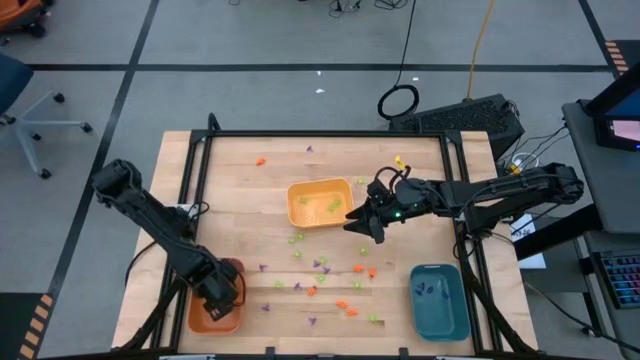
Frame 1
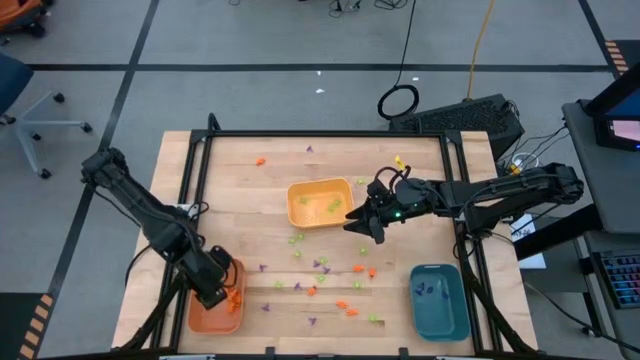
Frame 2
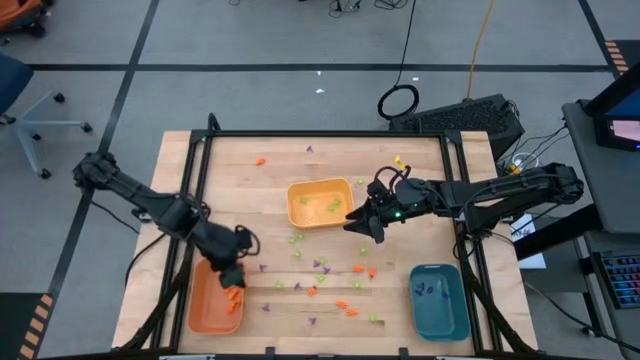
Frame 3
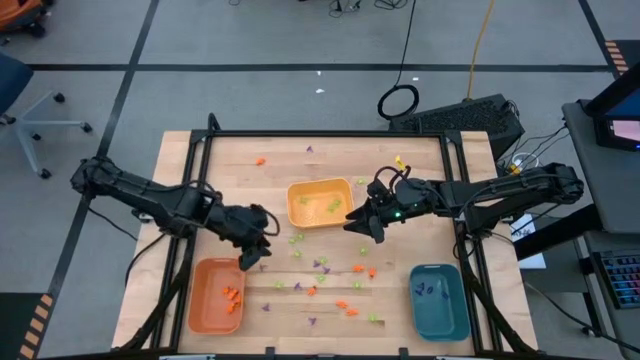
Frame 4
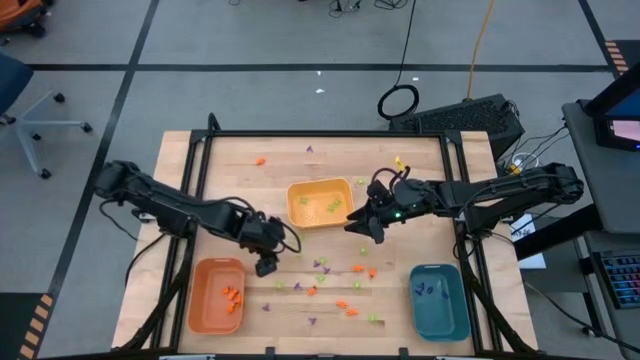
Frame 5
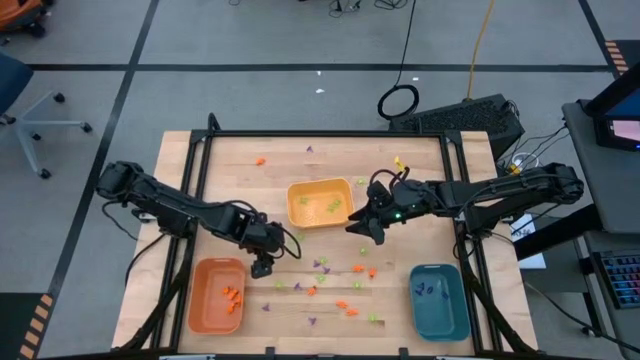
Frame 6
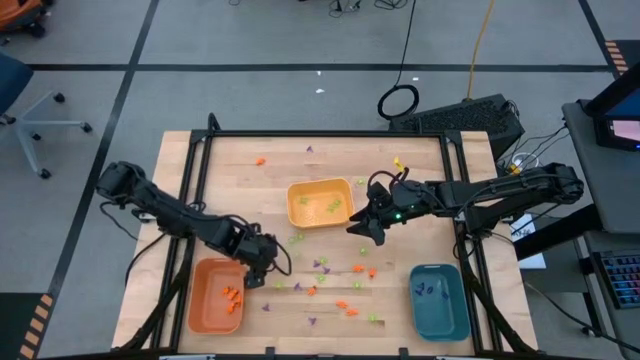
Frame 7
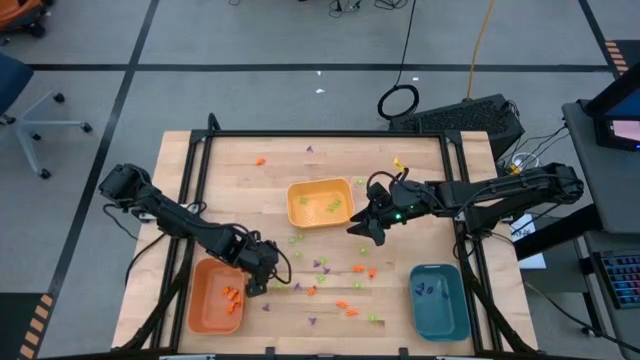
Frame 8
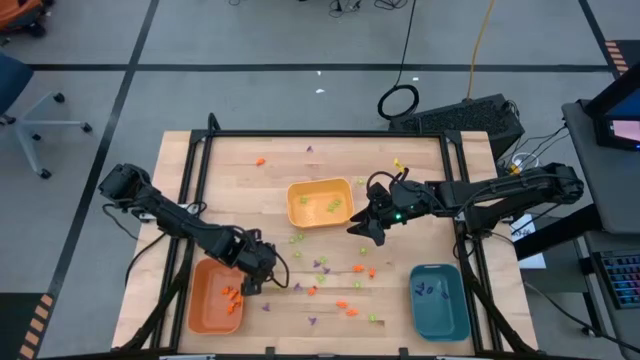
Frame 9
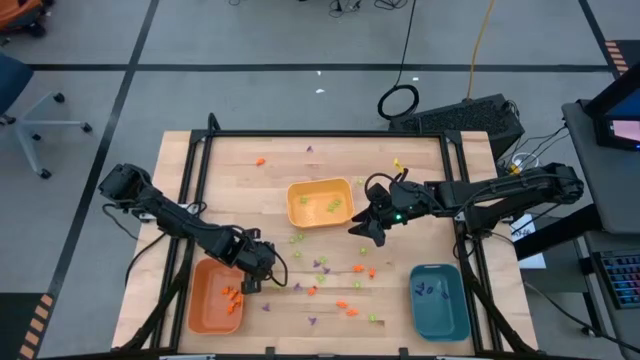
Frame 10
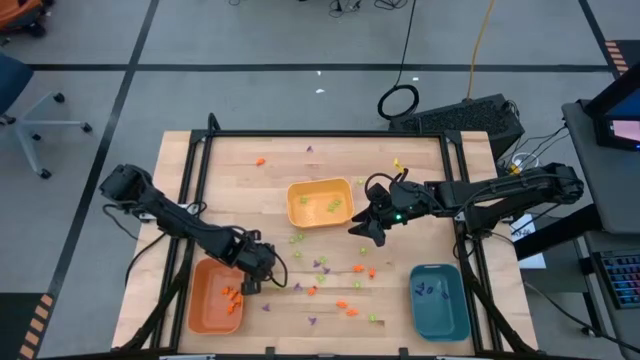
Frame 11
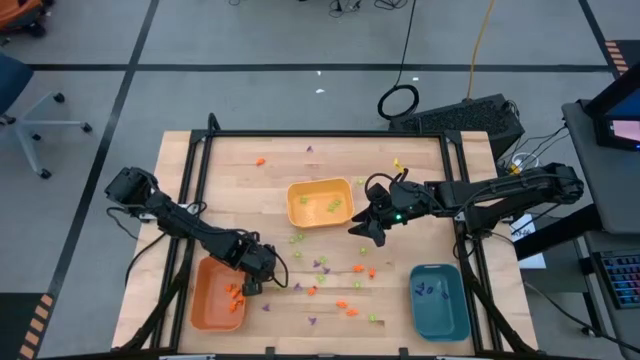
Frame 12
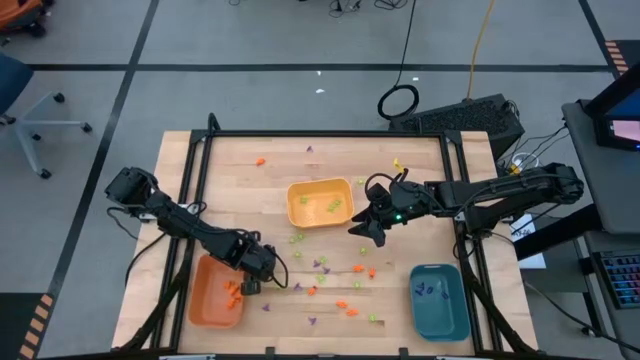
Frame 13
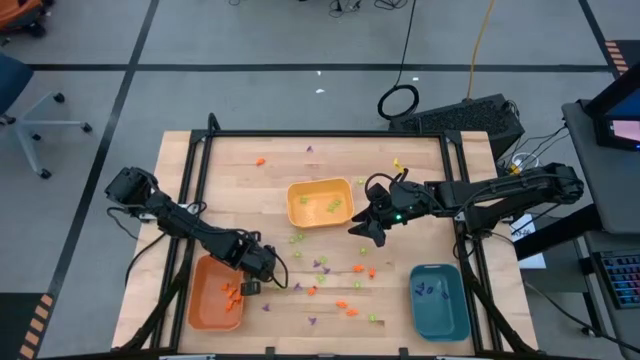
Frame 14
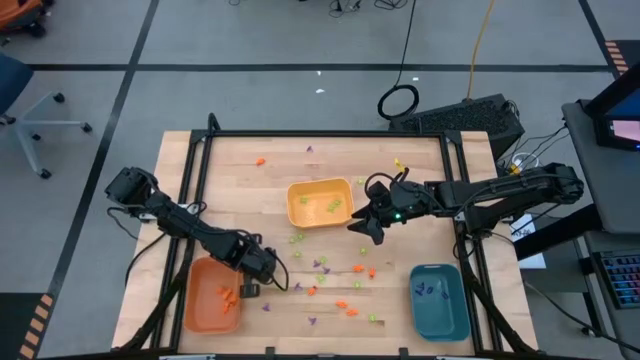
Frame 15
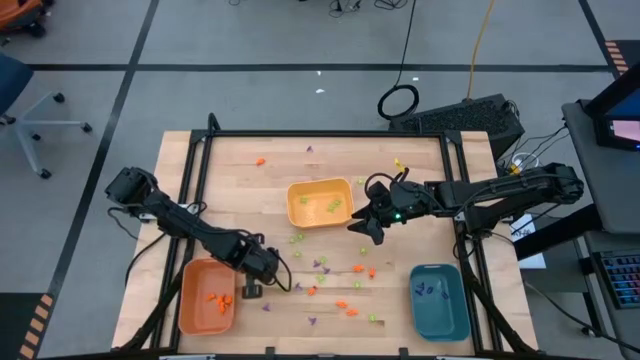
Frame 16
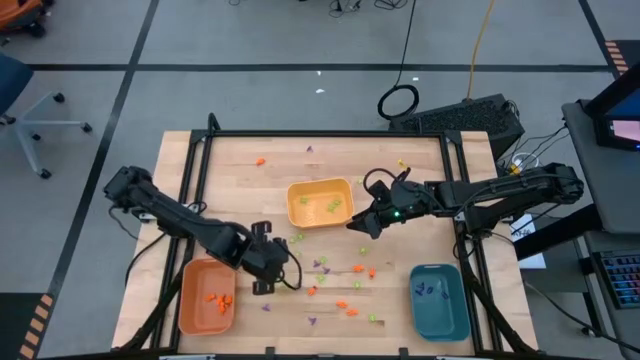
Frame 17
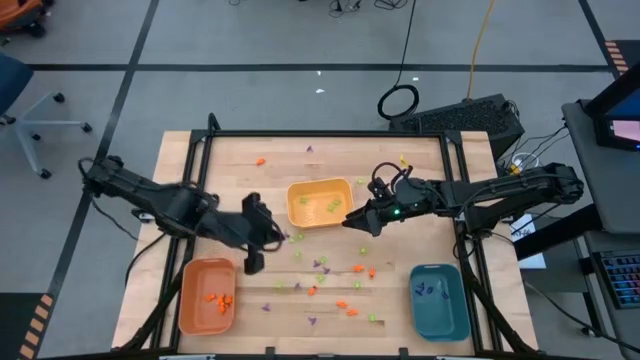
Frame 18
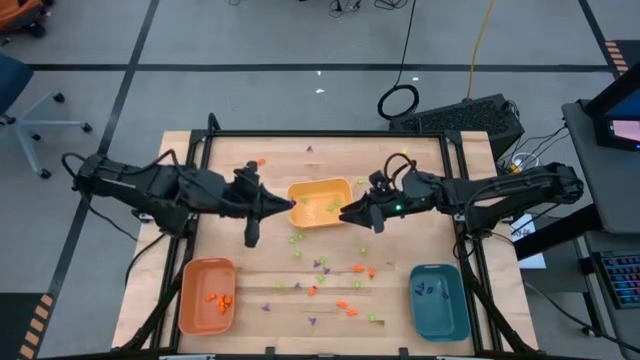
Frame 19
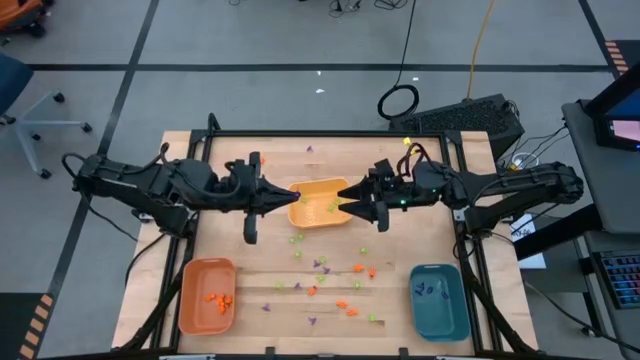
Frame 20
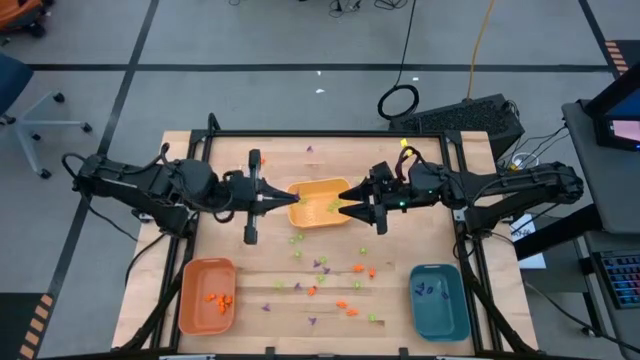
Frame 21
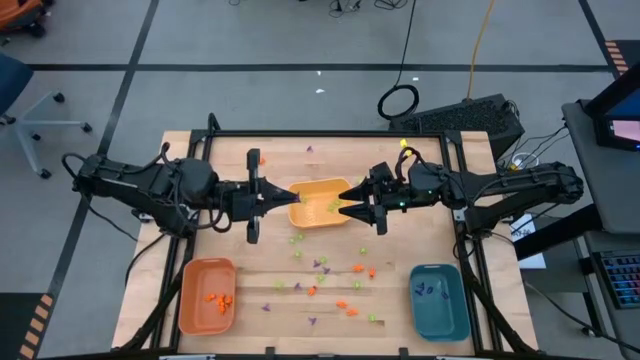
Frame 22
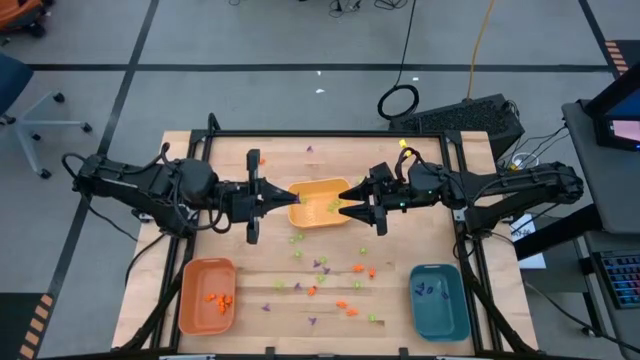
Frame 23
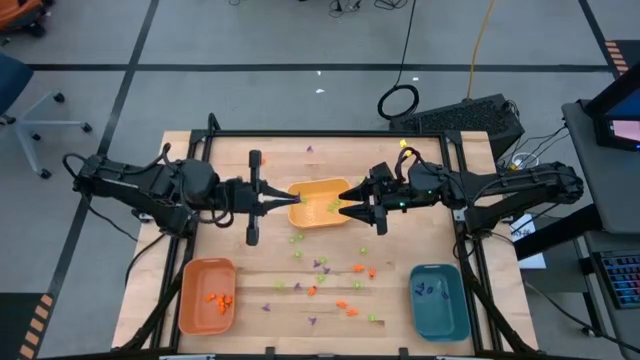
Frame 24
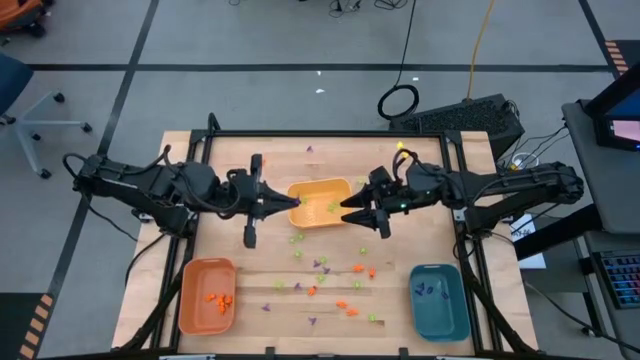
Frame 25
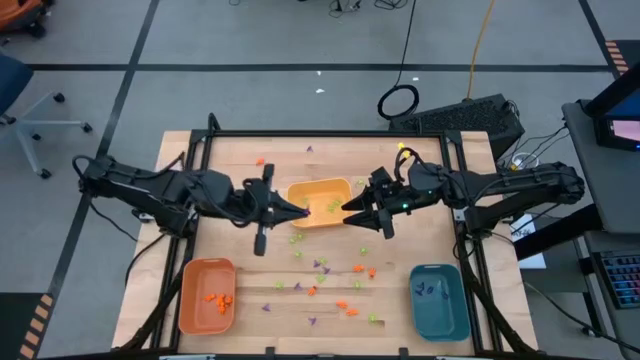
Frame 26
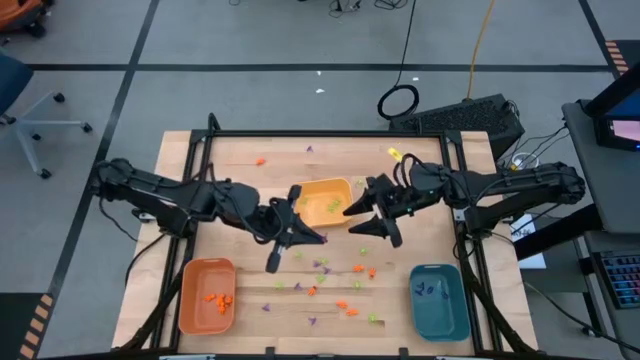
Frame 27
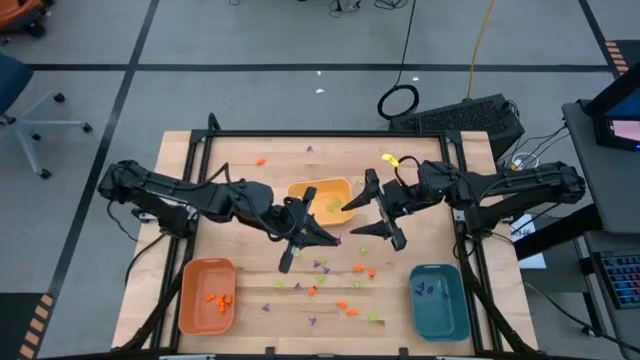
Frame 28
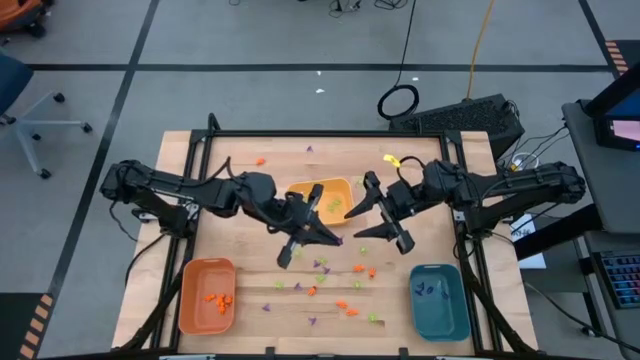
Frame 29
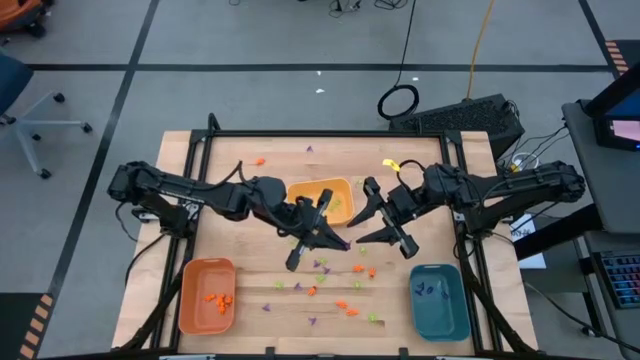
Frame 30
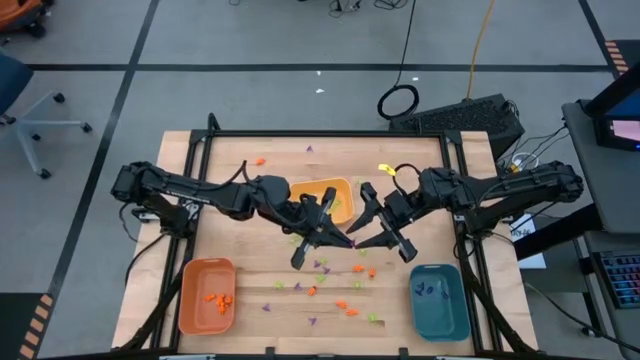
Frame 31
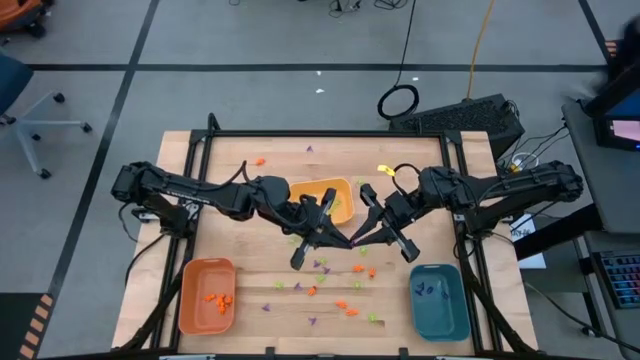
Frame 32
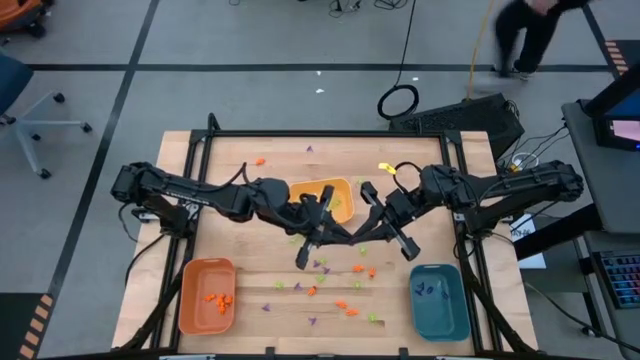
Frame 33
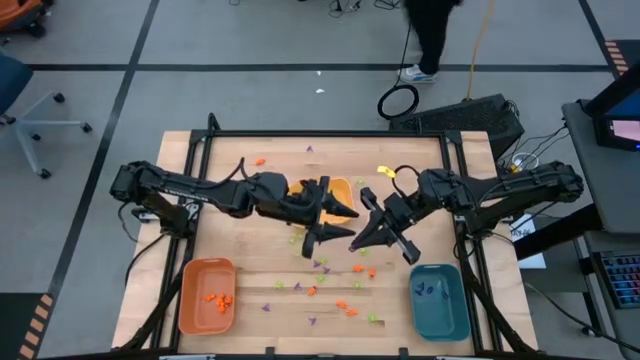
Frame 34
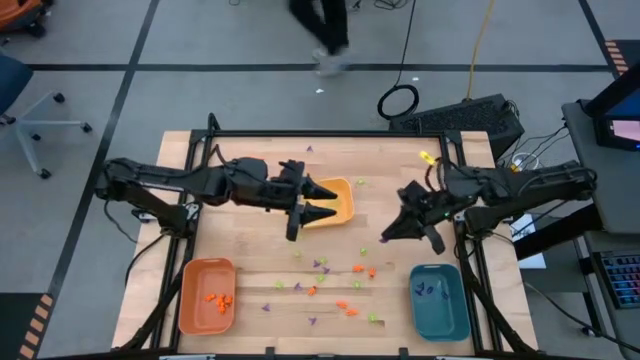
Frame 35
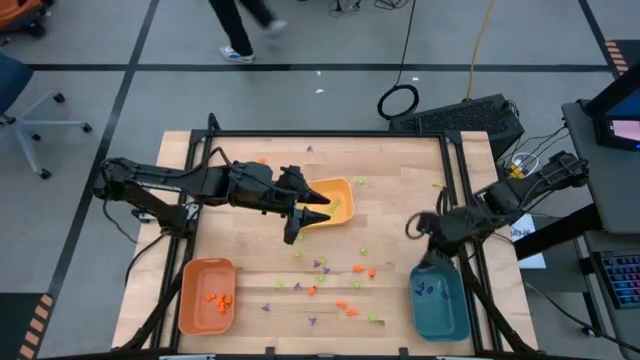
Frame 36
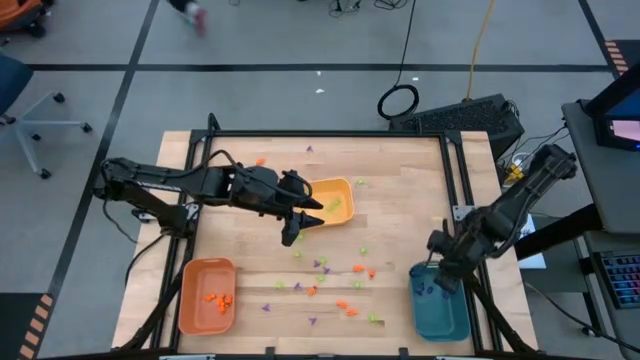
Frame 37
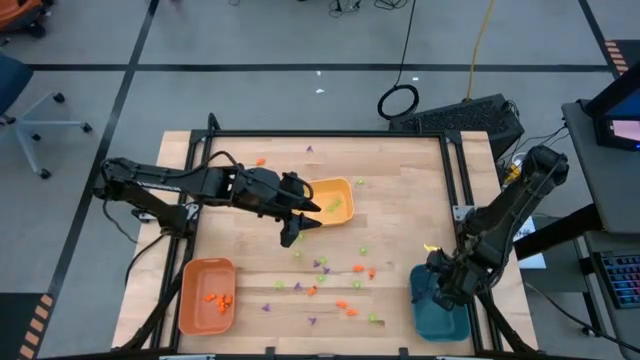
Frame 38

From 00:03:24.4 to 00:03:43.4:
Task: Sort Halloween decoration
Put the violet witch hat toy into the blue bin

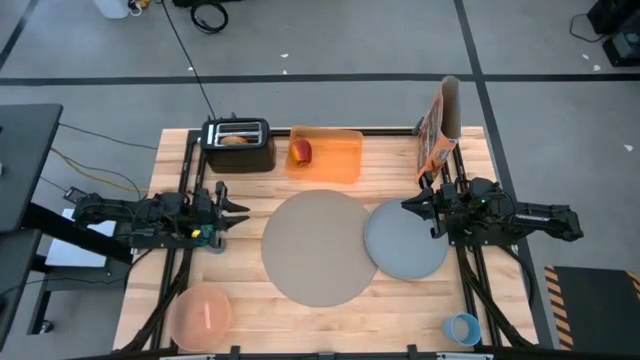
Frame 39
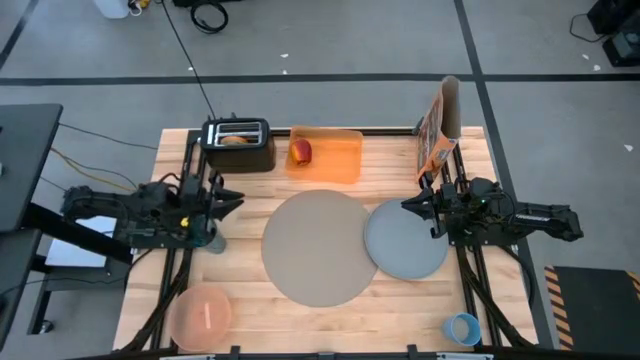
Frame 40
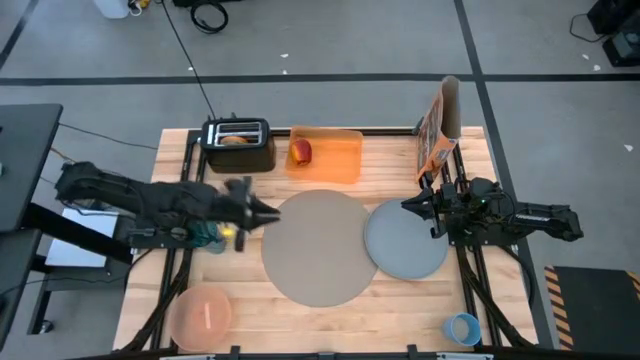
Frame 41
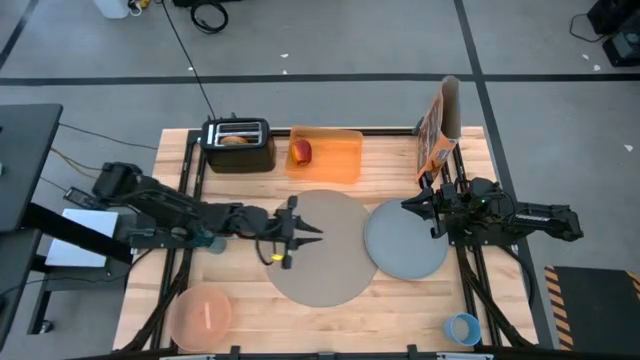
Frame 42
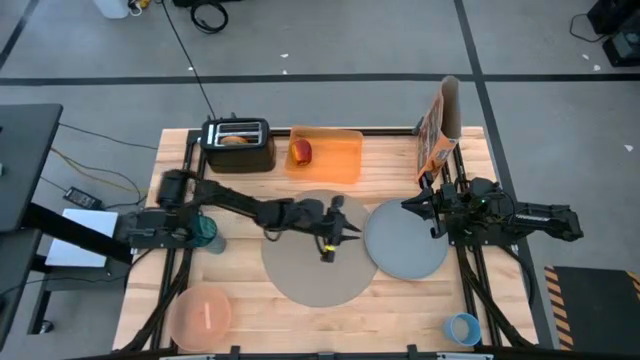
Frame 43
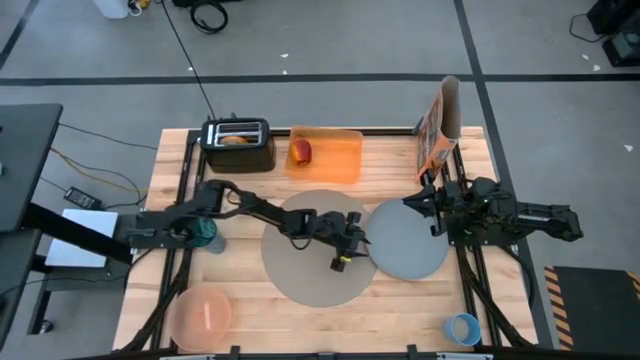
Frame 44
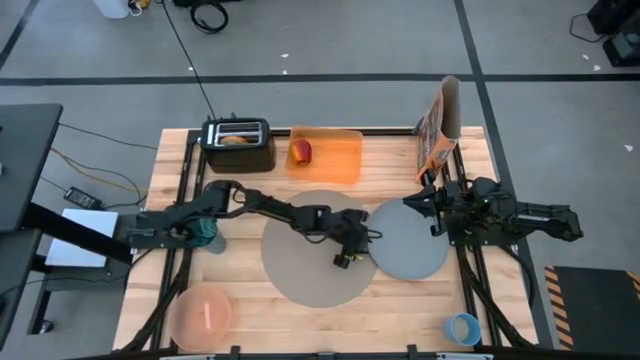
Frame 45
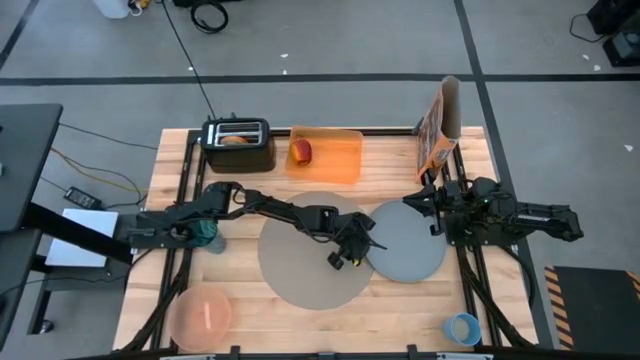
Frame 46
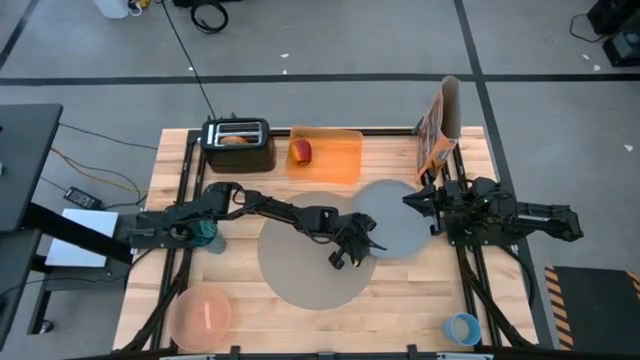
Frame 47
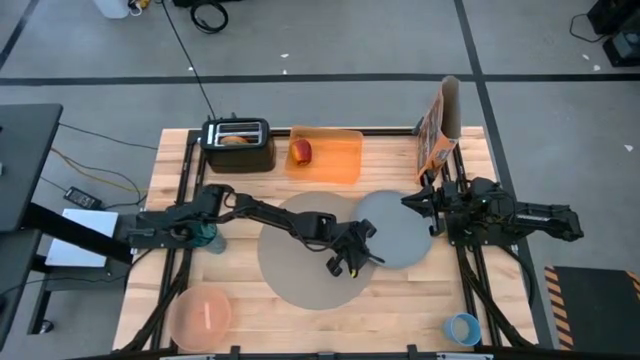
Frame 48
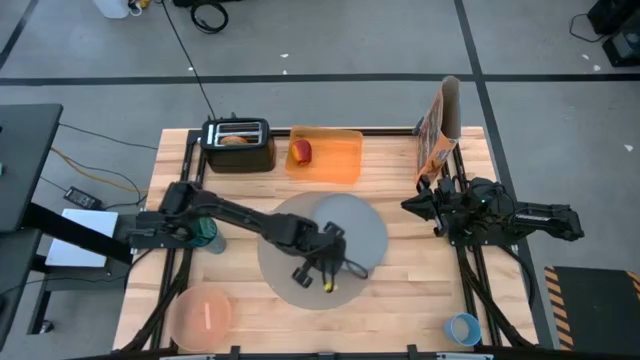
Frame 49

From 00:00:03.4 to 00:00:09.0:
Task: Arrange a breakfast setting
Put the blue plate on the brown tablemat
